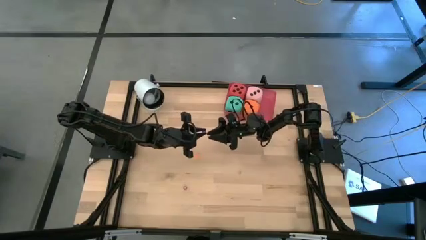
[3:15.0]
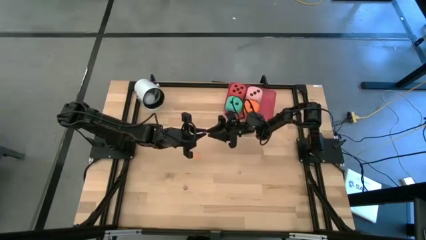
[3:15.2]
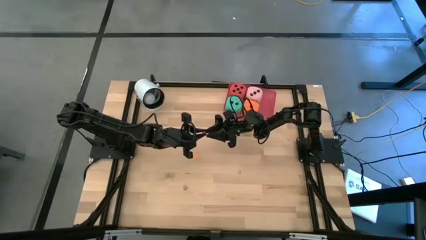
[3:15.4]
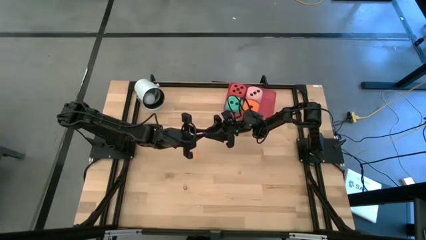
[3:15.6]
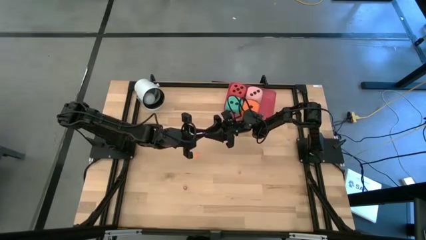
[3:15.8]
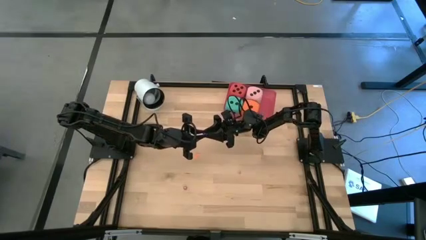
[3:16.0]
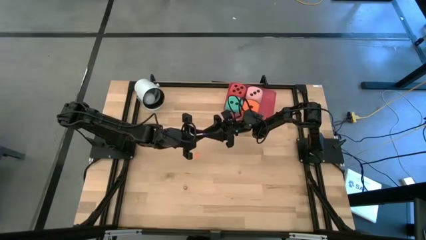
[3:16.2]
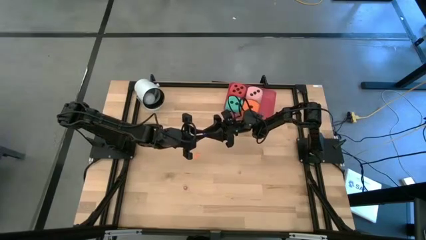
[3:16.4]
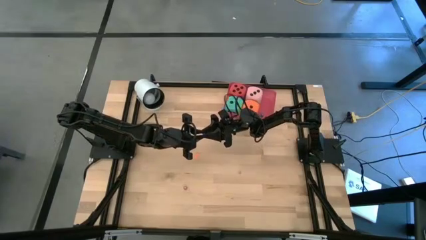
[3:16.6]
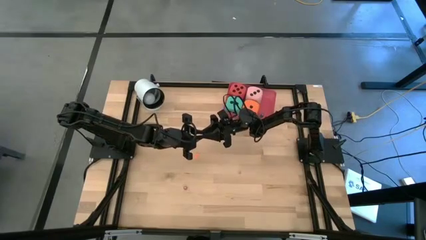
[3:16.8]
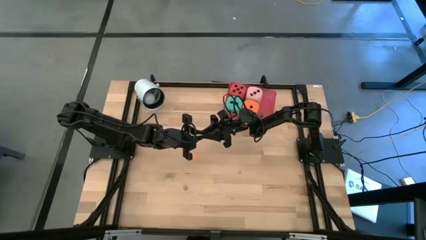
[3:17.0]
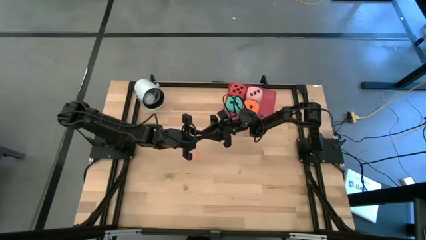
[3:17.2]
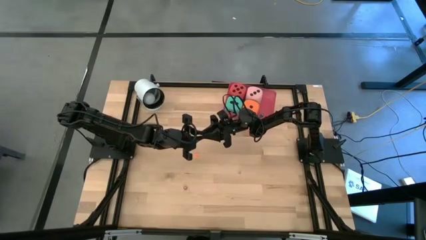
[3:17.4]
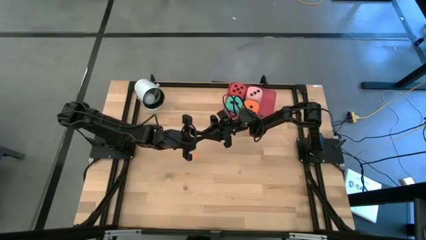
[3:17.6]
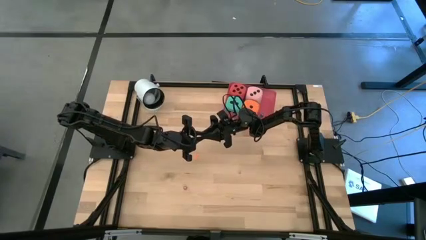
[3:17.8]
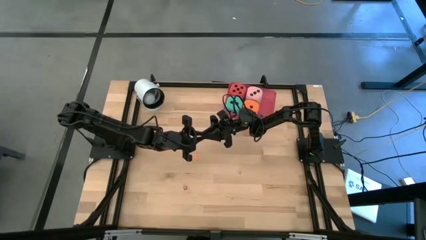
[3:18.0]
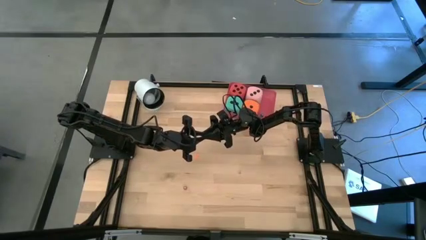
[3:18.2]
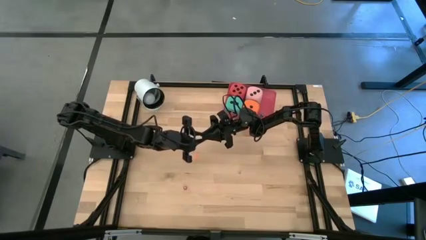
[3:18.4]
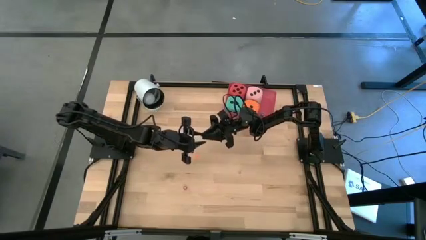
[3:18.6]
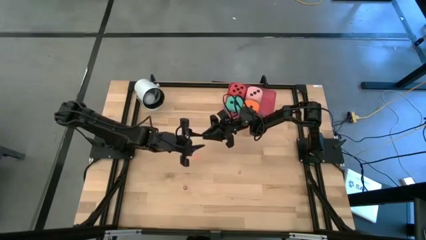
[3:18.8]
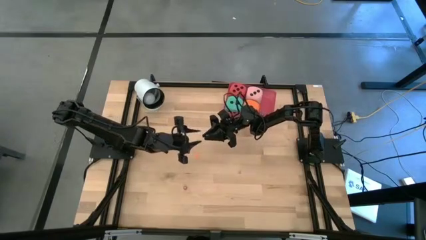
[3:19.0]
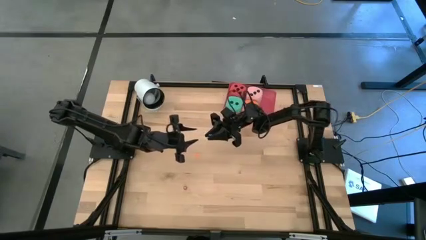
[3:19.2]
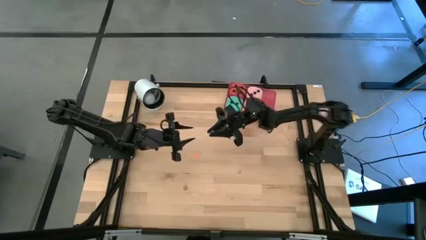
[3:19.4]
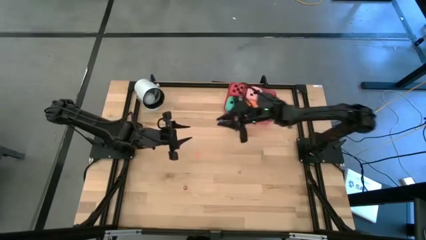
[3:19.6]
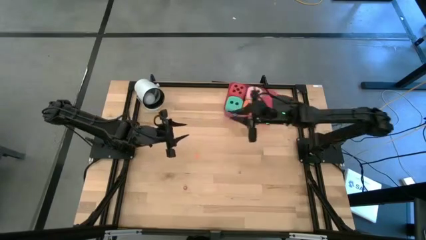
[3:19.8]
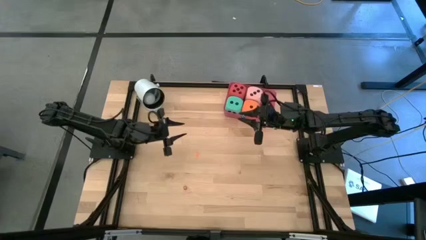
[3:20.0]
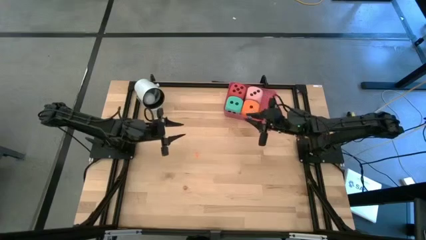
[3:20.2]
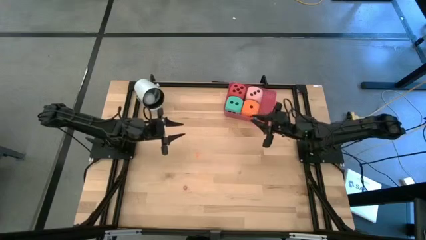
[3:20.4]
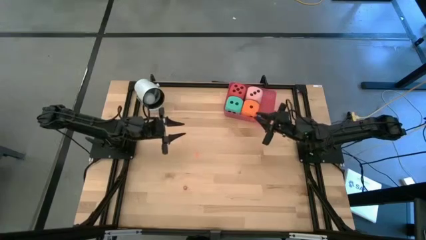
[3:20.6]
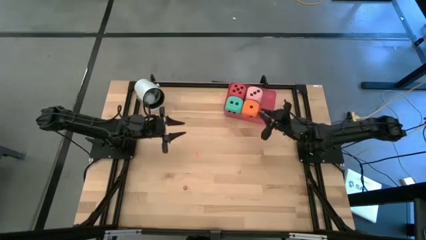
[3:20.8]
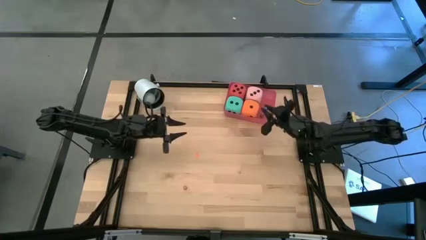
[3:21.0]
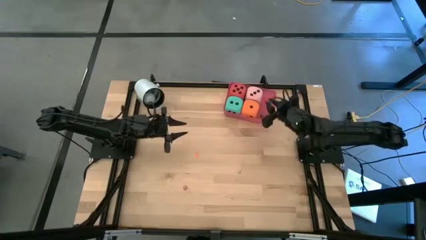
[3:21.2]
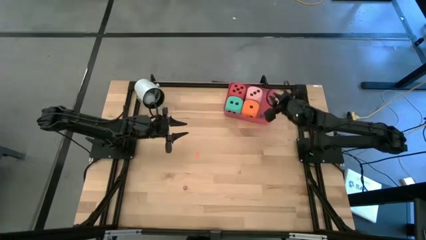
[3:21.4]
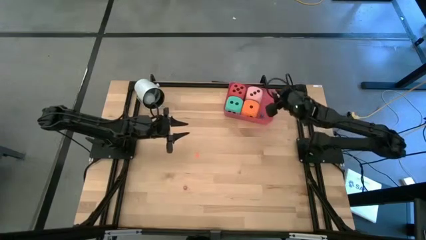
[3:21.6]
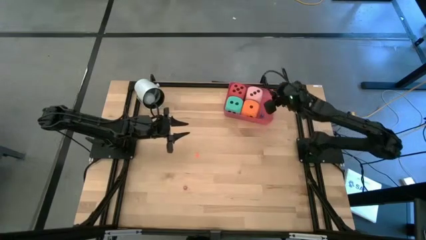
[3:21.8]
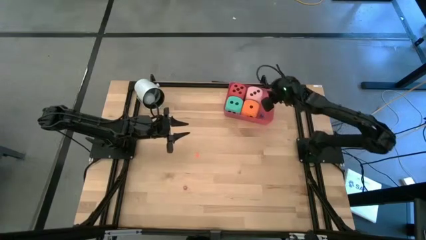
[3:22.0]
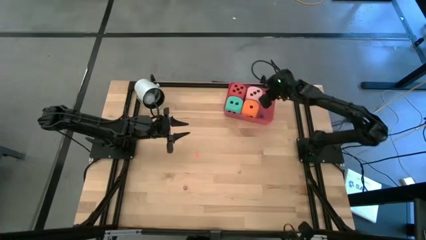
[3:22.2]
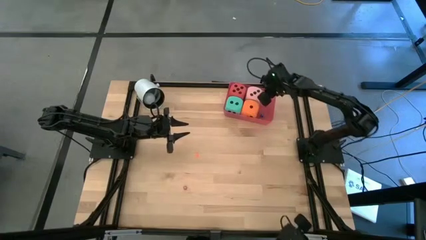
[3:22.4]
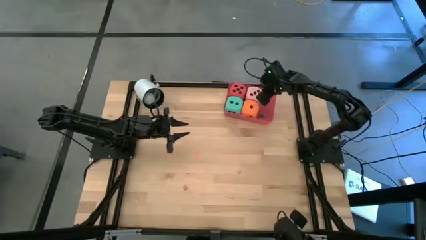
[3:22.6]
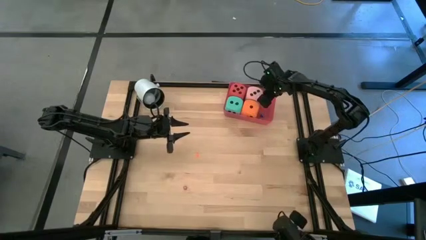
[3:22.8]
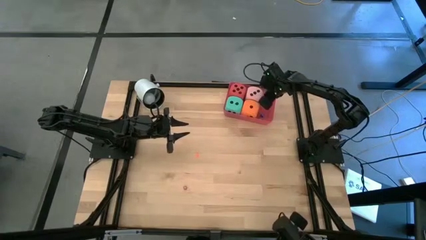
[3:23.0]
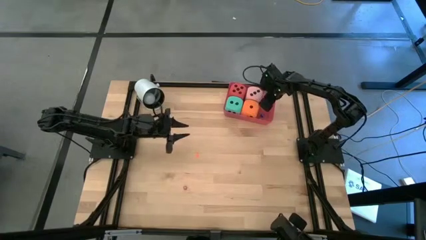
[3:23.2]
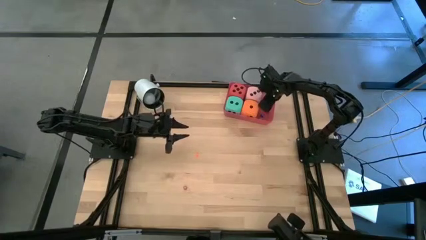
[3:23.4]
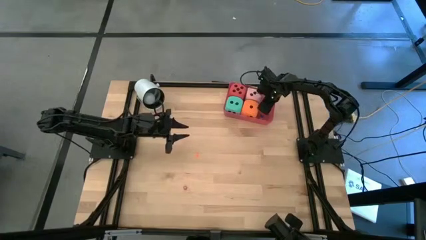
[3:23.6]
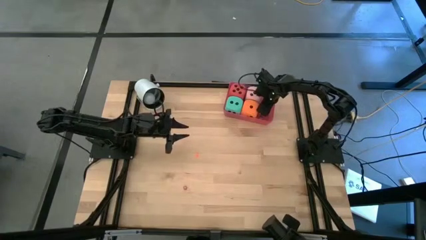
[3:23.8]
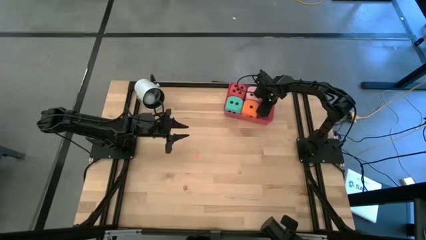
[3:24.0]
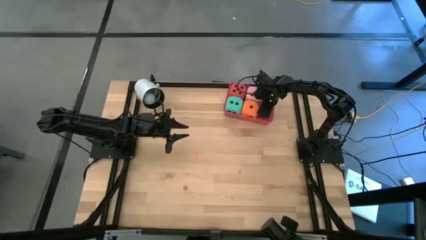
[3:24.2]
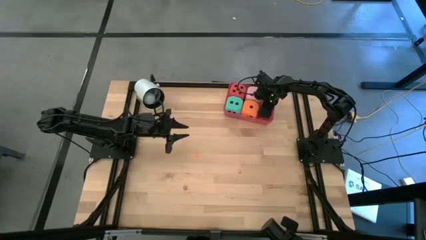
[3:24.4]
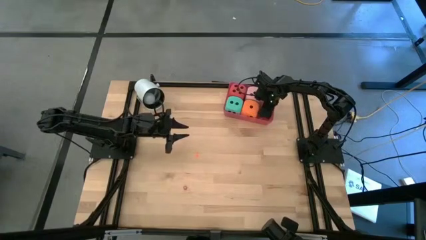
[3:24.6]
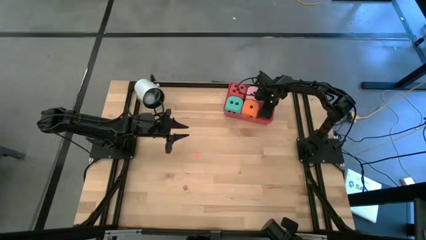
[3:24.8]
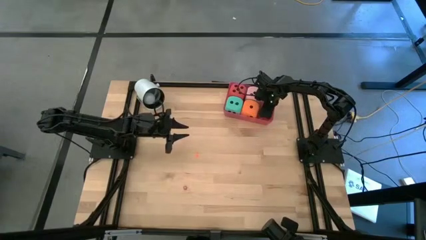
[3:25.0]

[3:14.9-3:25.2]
Task: Pick & Place Dice
Put the small blue dice into the red bin
